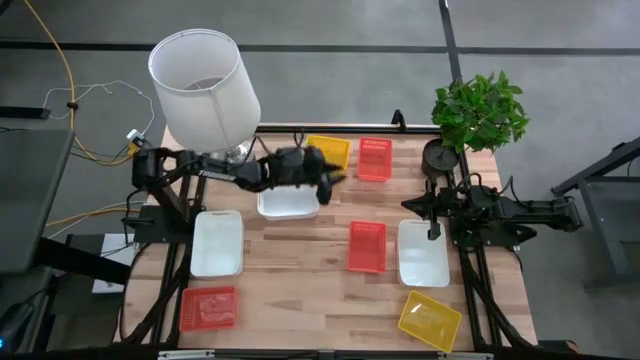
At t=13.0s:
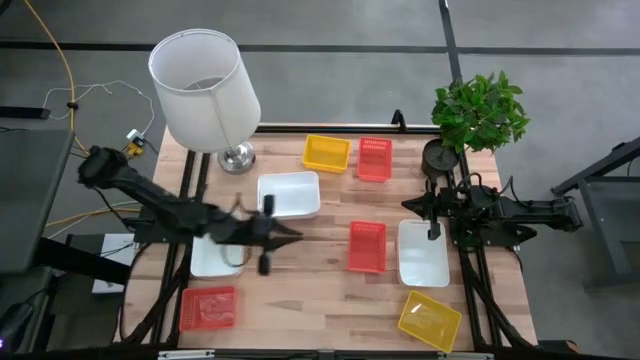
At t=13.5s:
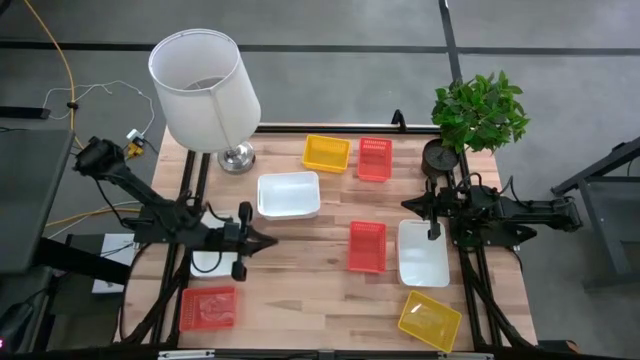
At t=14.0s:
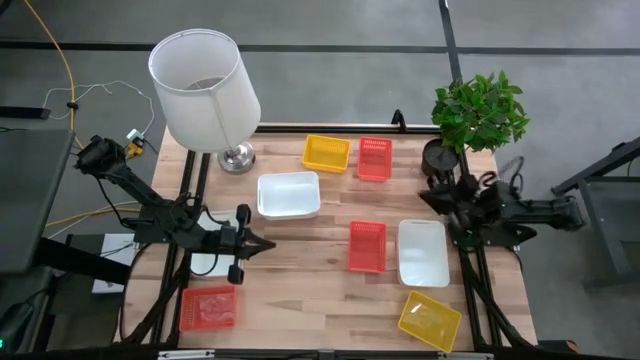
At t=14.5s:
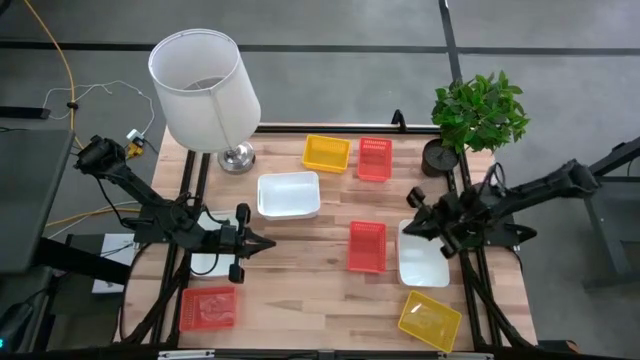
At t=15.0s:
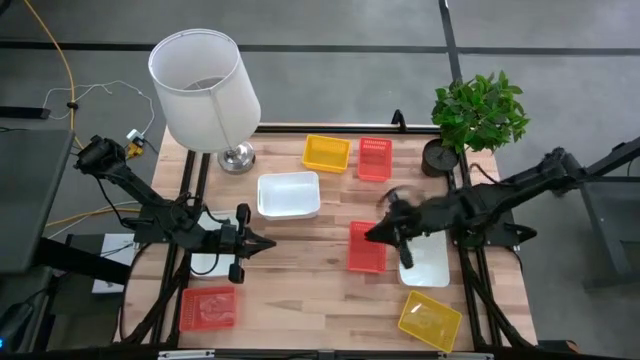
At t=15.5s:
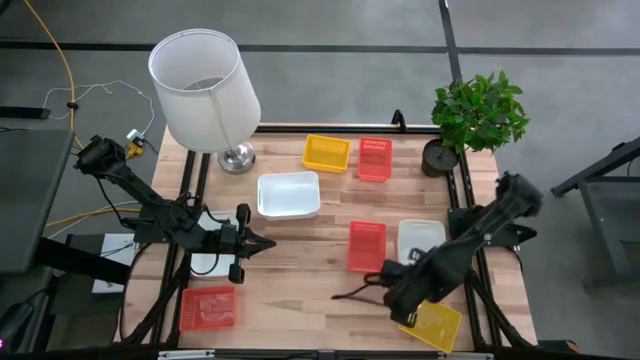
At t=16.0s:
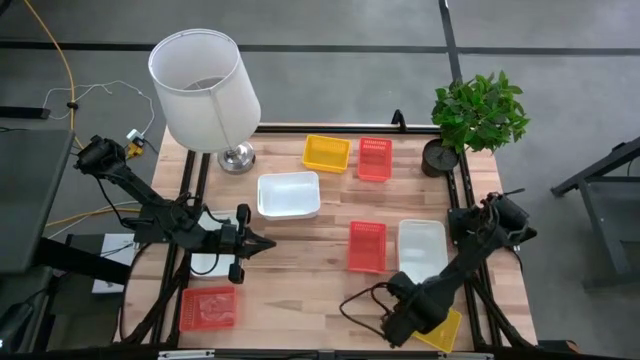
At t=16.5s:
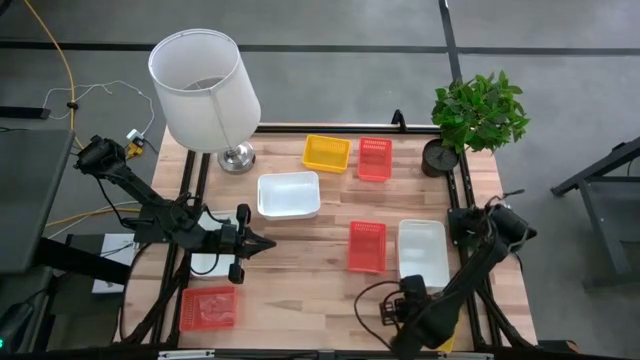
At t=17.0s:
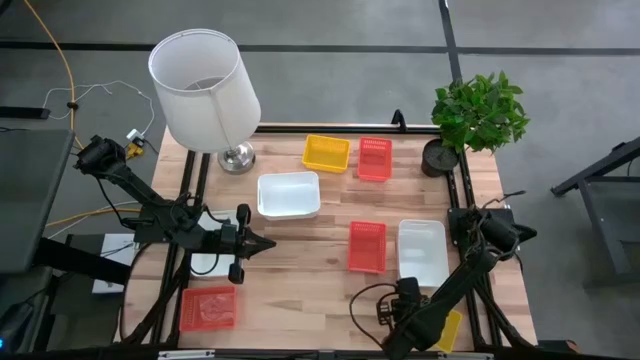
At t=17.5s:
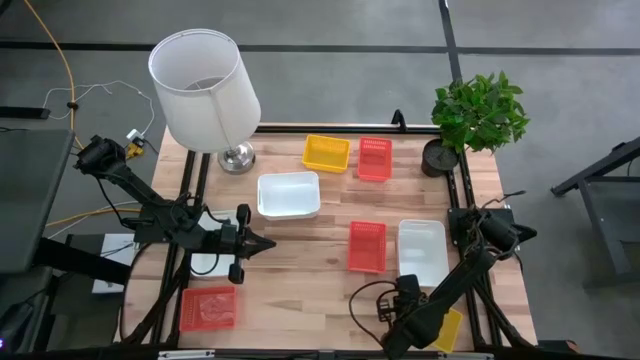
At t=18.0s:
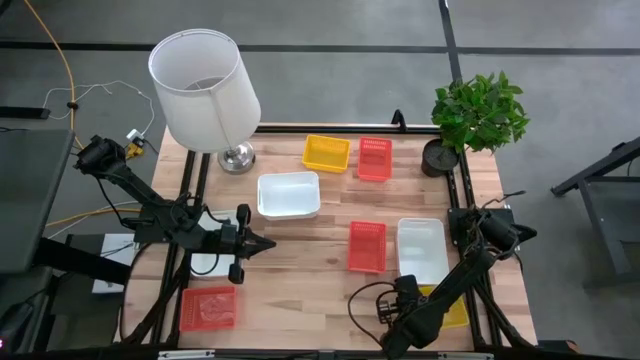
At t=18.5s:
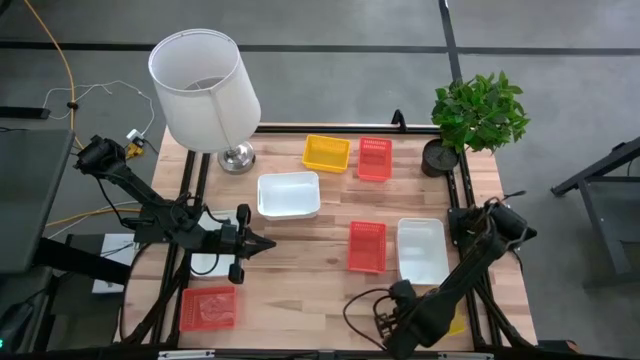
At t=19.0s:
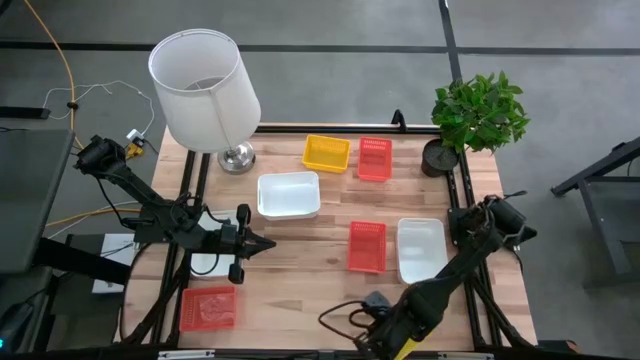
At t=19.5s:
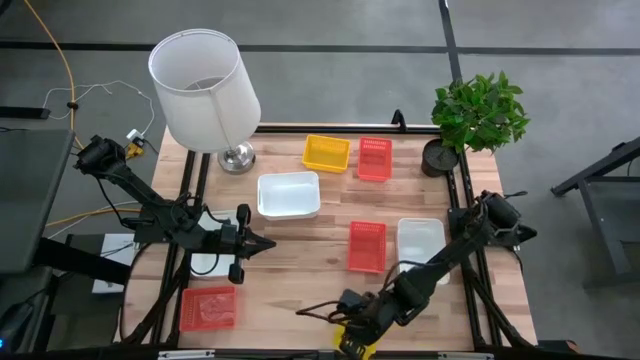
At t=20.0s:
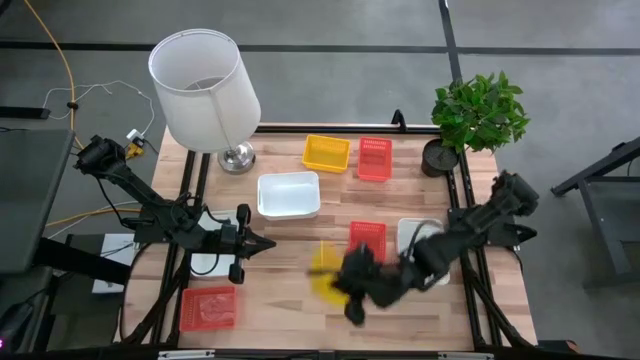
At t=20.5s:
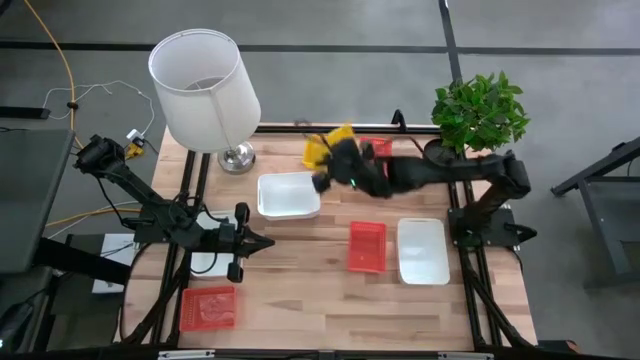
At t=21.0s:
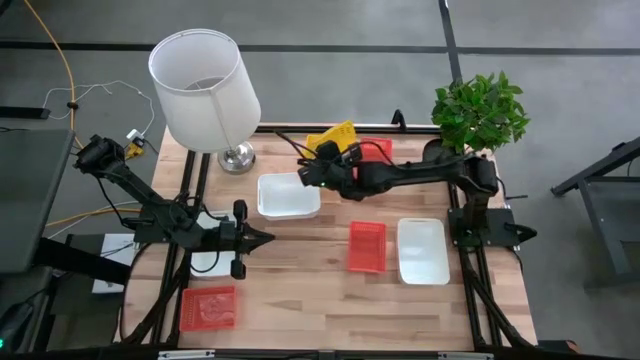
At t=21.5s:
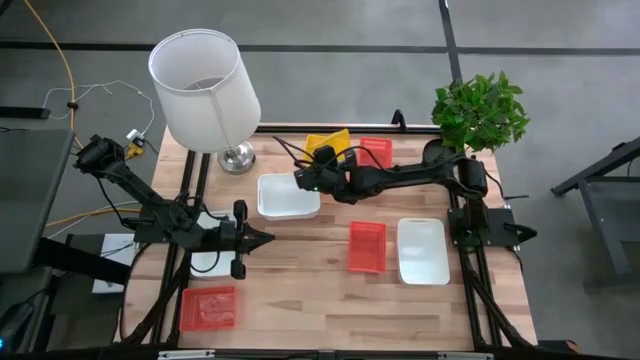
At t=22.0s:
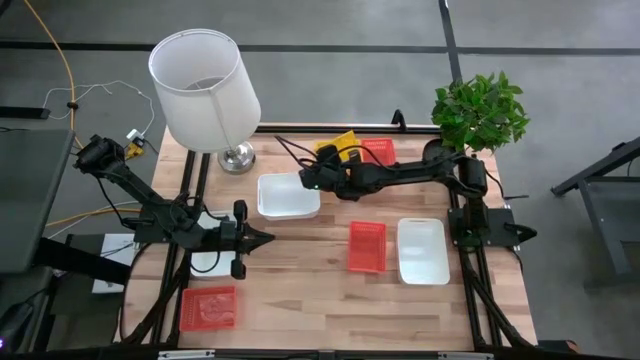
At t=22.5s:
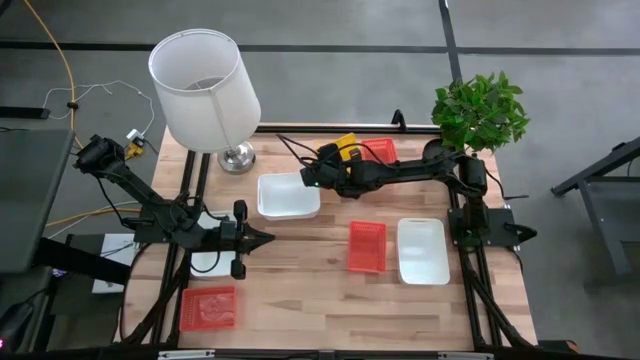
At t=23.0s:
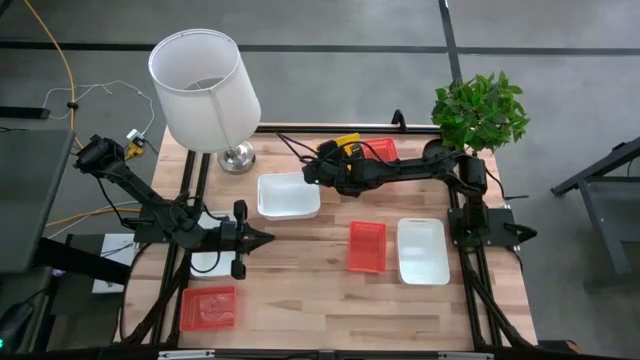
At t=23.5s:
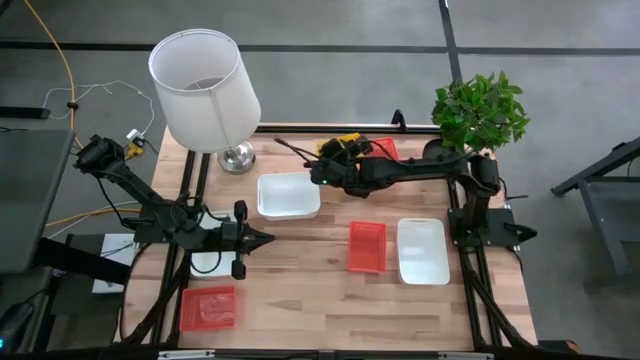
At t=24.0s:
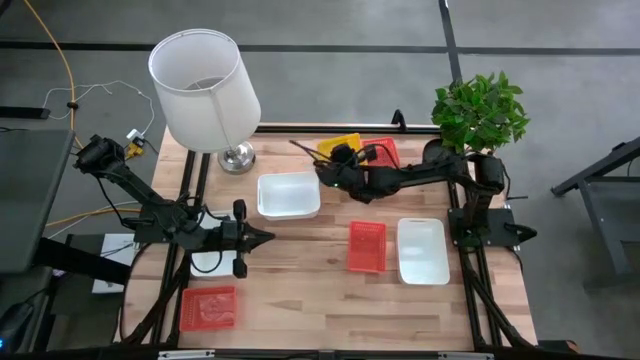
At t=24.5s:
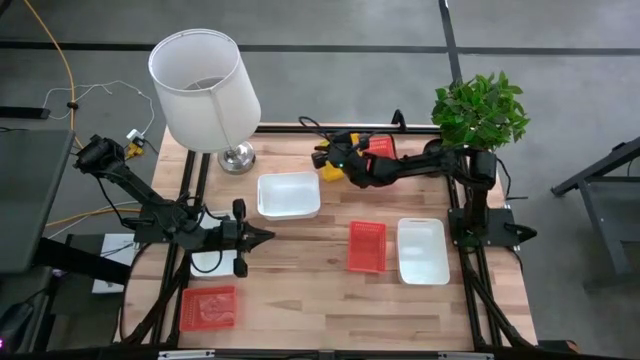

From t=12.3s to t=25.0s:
Stack the bottom yellow bin on the top yellow bin

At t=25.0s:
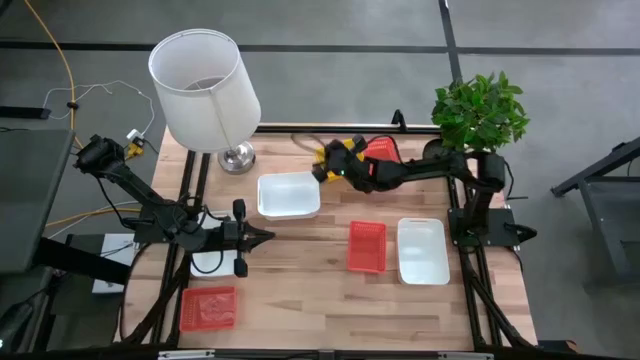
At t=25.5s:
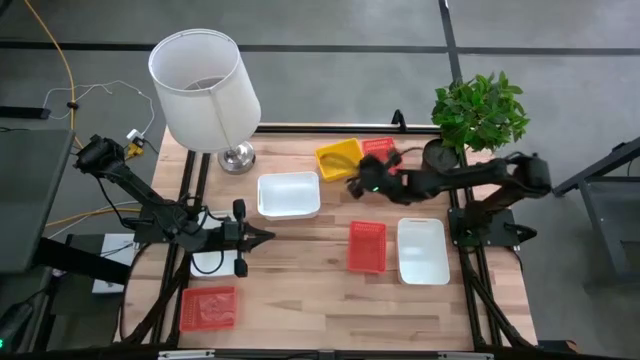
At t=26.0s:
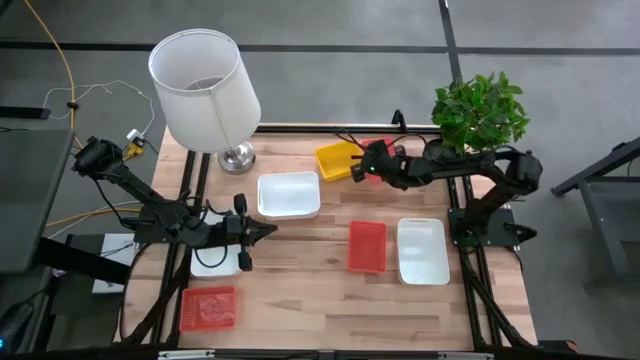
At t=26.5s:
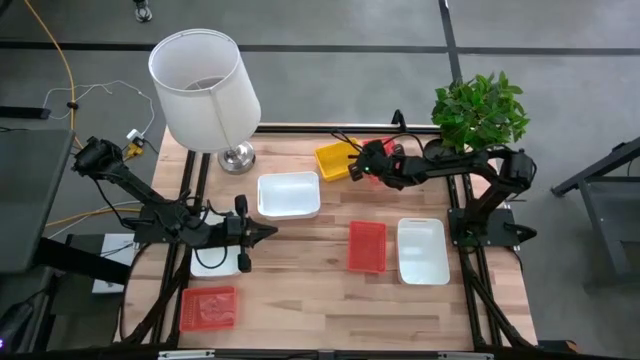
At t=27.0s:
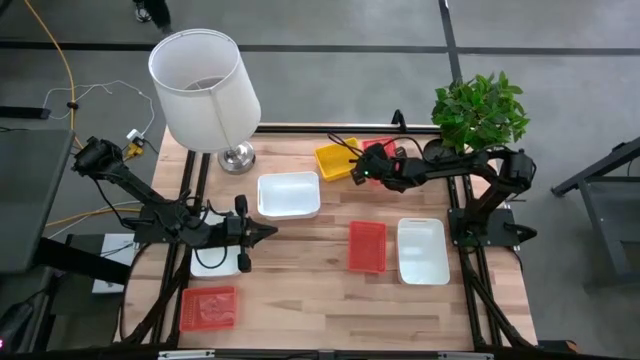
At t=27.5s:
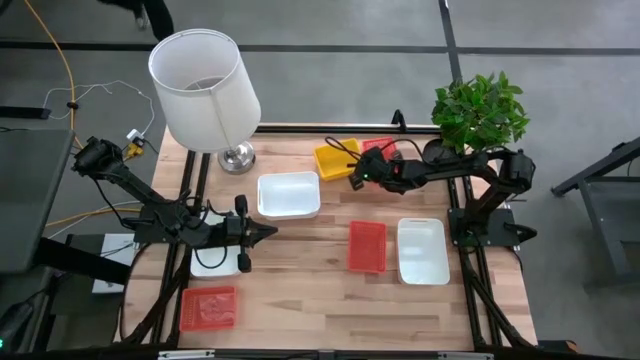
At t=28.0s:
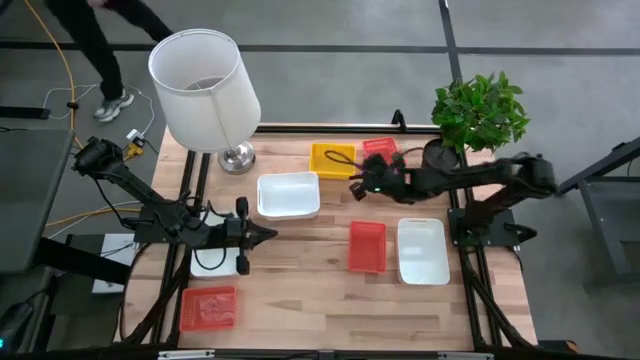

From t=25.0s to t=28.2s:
Adjust the stacked yellow bins
